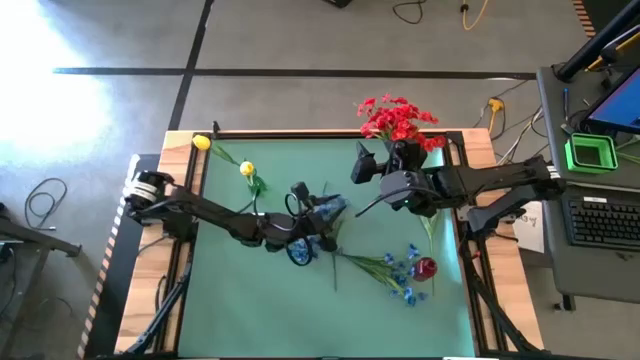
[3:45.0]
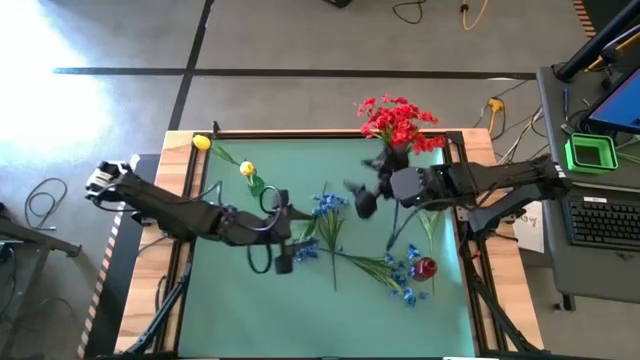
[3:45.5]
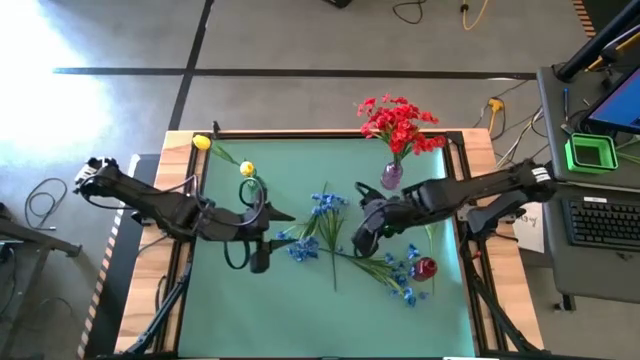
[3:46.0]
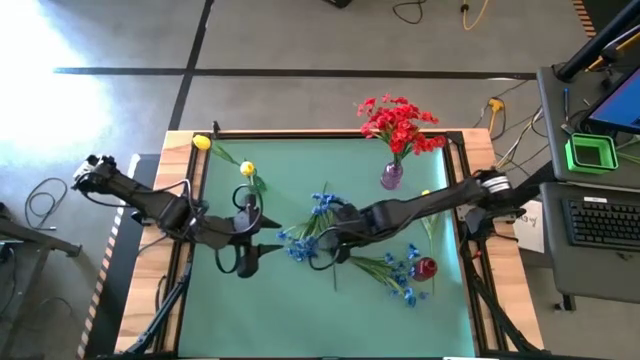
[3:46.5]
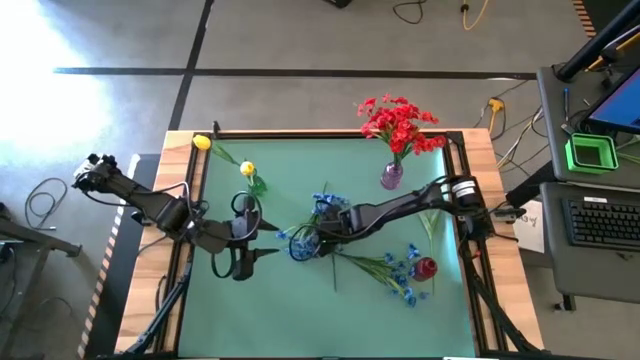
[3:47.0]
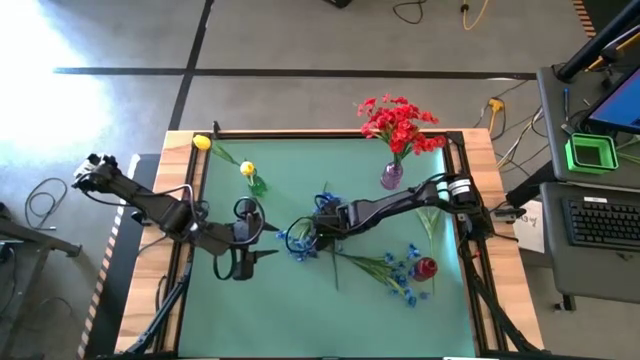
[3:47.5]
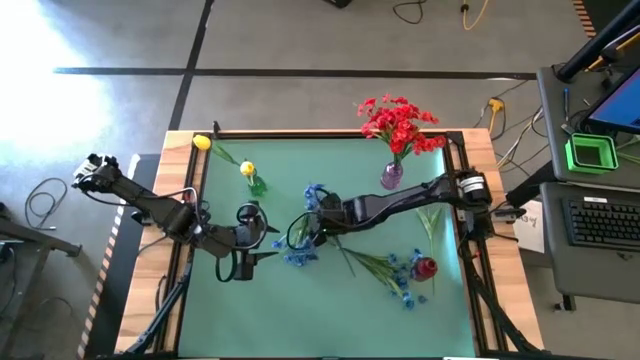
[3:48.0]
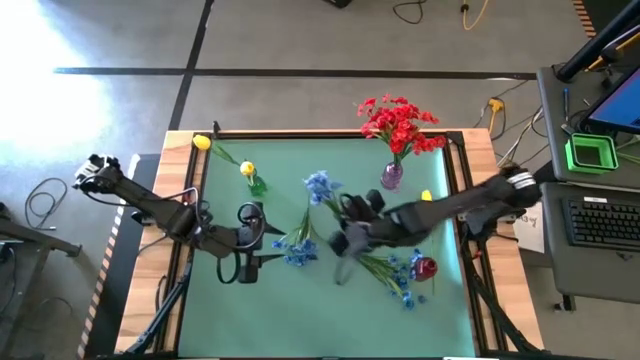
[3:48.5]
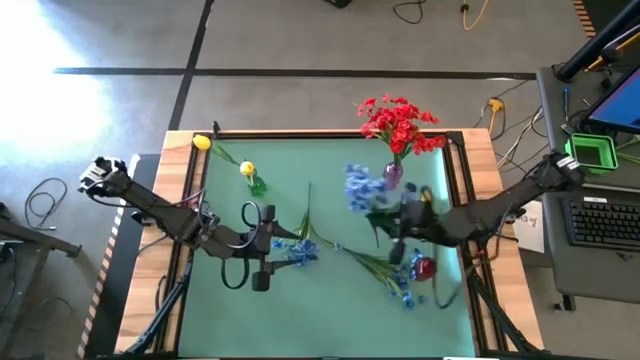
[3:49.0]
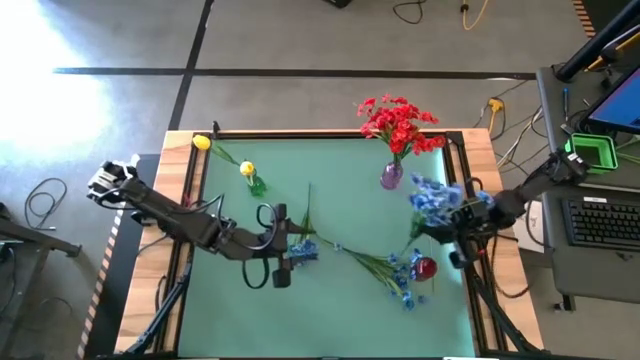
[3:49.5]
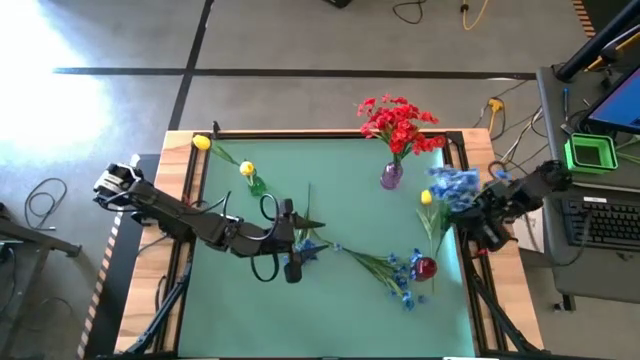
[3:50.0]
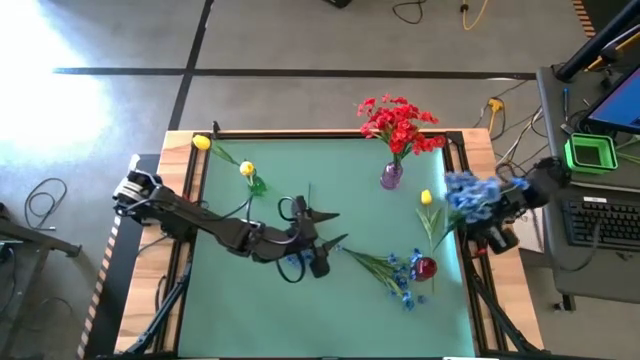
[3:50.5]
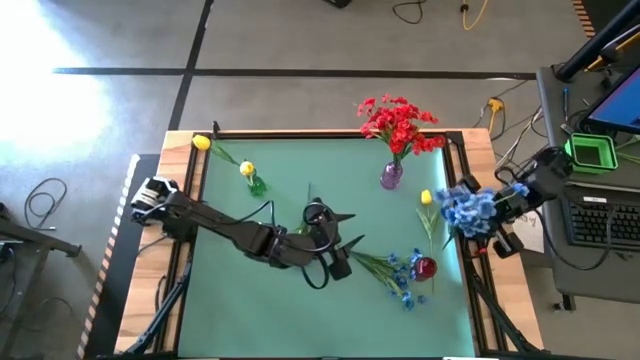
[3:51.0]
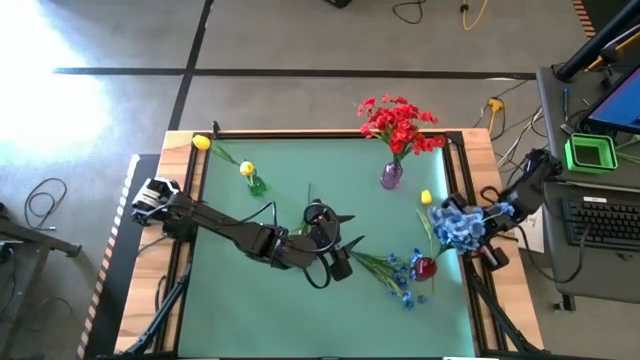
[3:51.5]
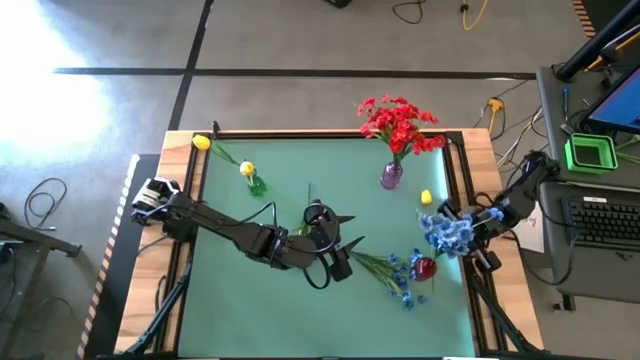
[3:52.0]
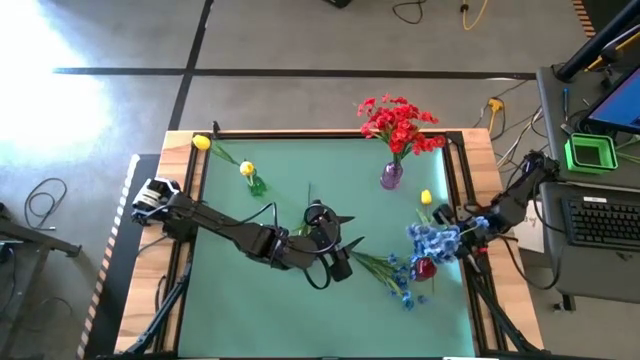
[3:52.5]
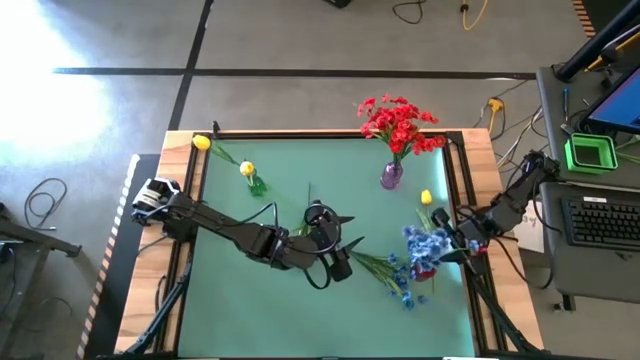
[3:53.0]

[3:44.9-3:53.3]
Task: Sort flowers into vase by color
Put the middle blue flower into the red vase

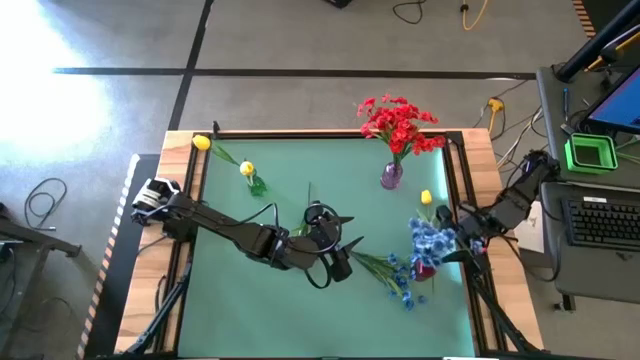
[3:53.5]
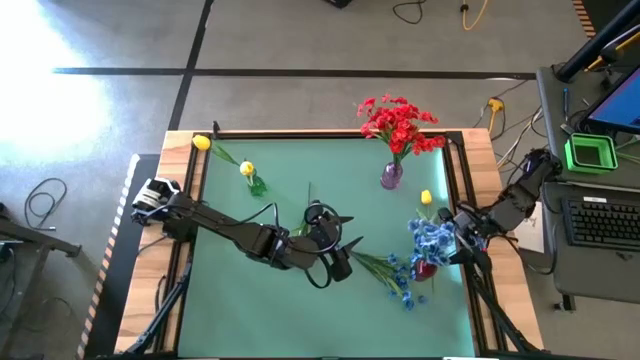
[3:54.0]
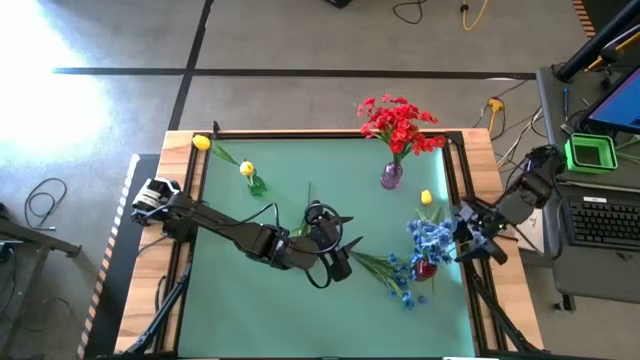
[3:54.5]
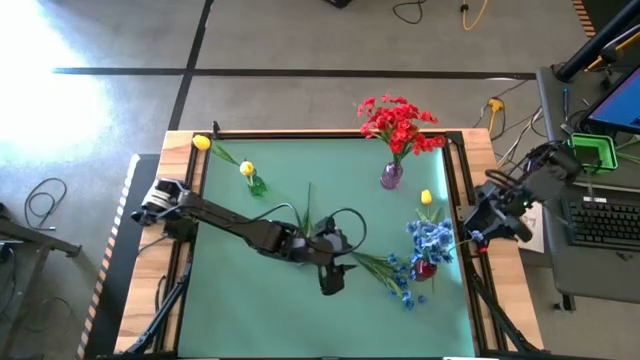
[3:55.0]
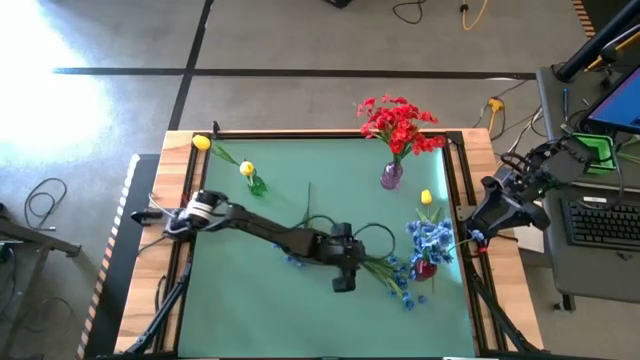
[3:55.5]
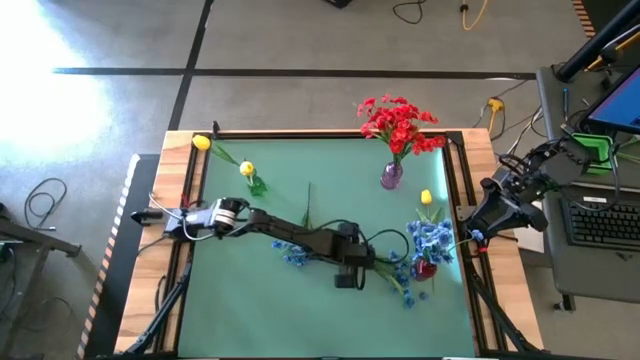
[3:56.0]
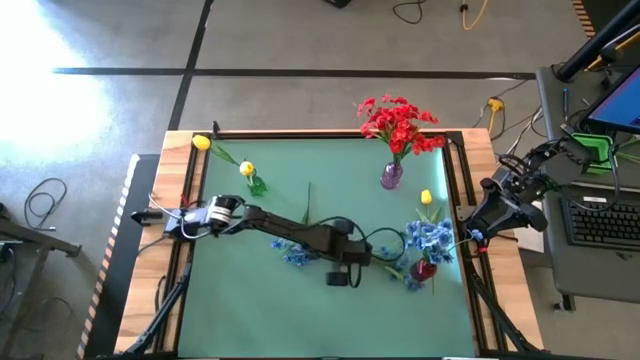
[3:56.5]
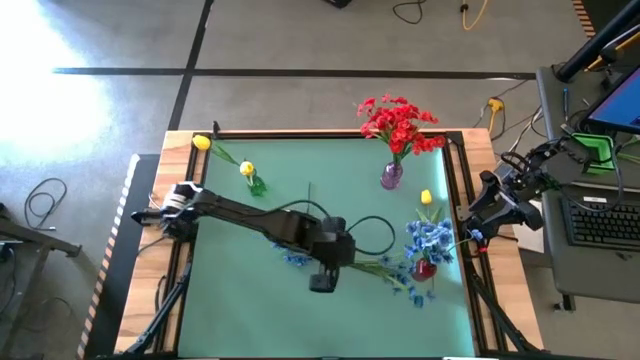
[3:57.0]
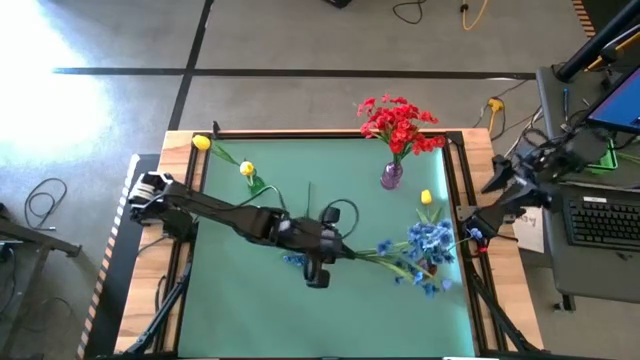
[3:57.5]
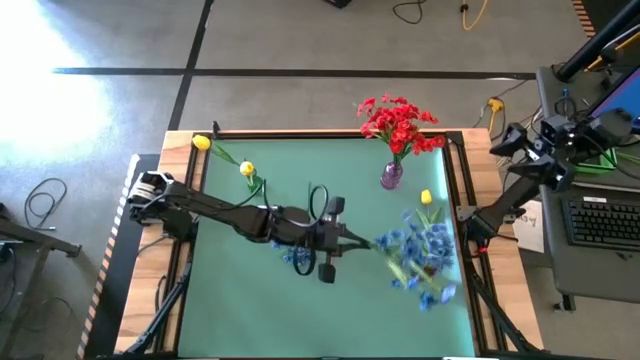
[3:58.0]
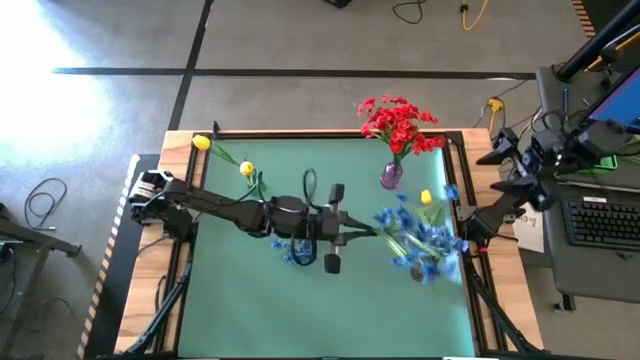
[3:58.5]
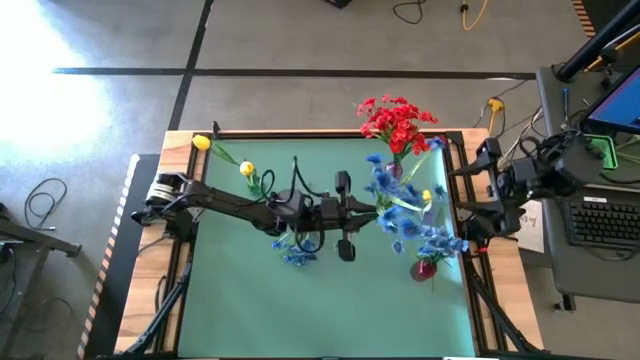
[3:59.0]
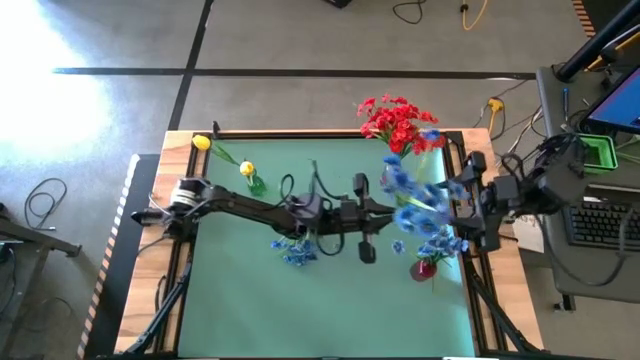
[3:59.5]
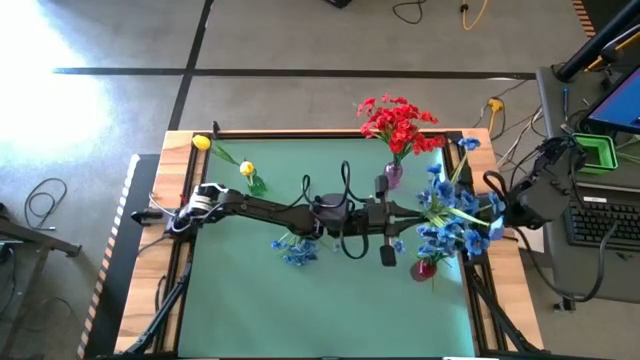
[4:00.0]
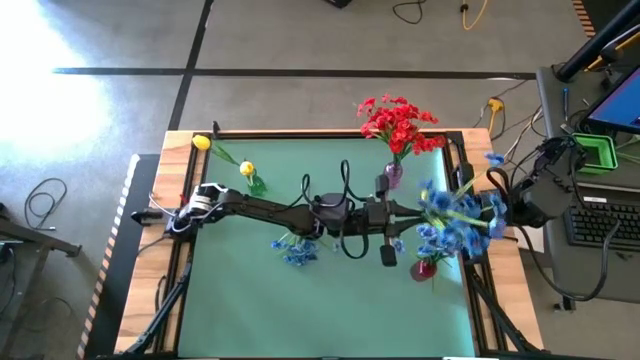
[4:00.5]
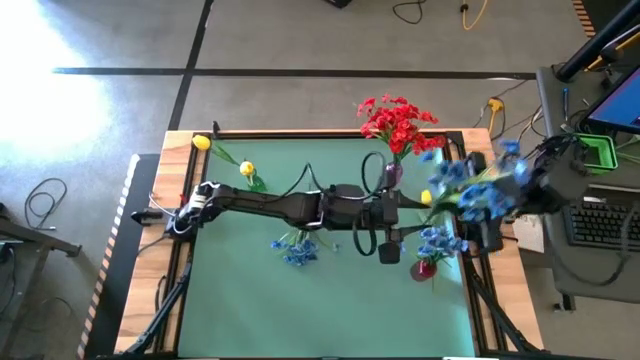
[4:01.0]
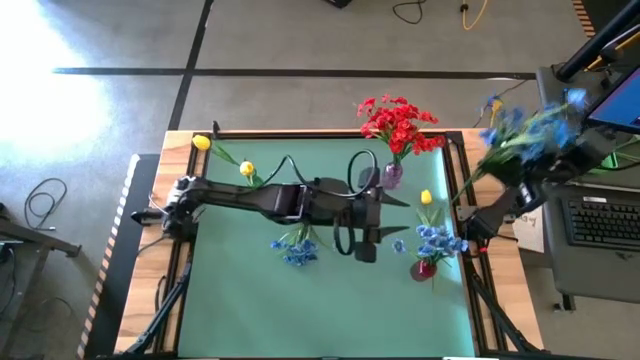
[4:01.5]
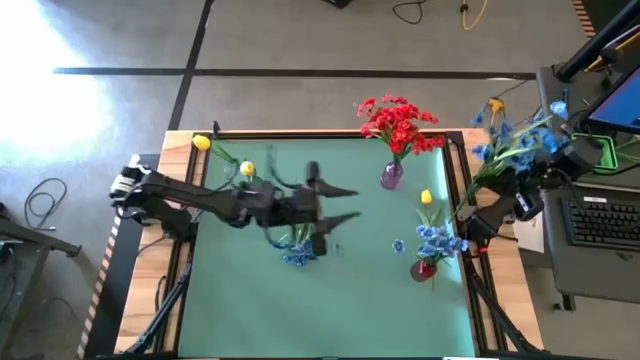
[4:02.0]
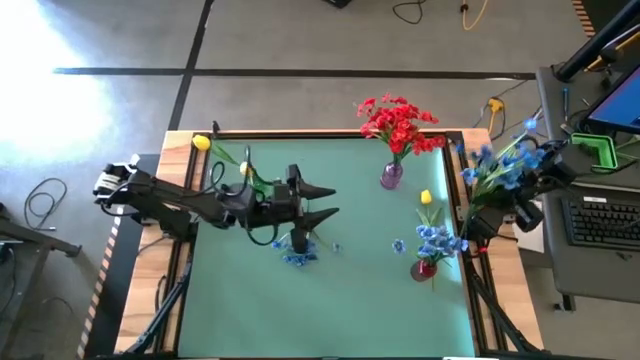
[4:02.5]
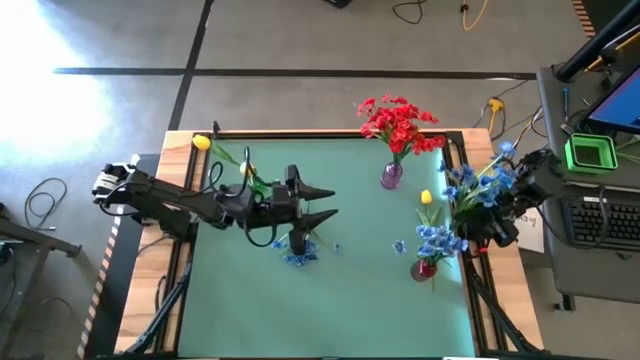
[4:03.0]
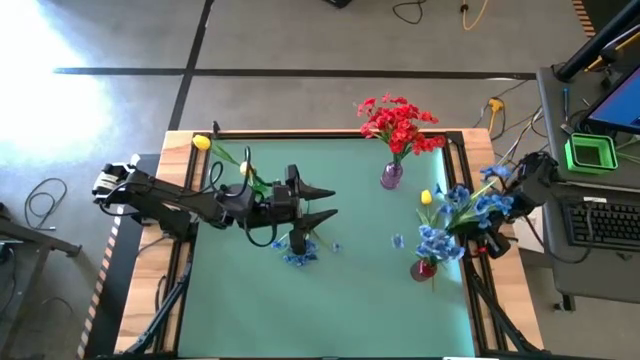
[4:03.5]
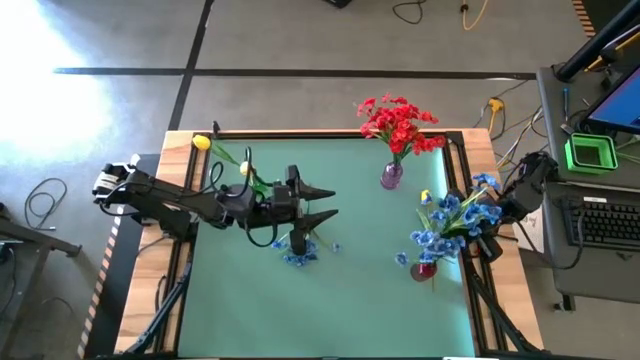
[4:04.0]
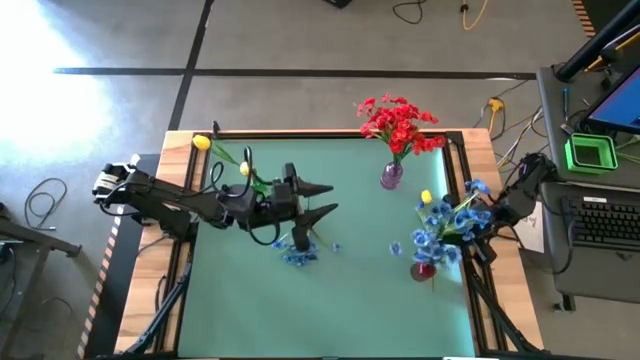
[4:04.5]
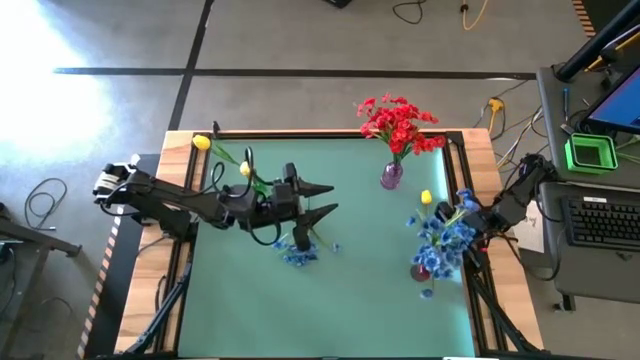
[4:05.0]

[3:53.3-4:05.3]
Put the right blue flower into the red vase

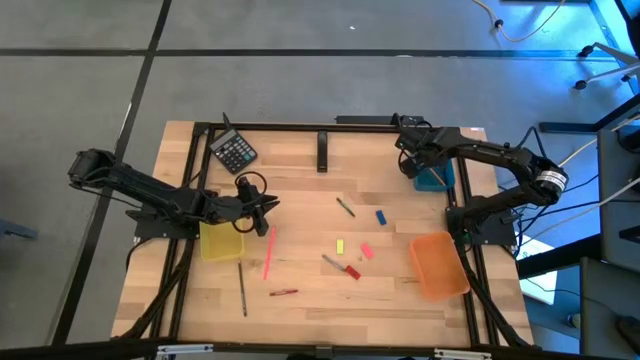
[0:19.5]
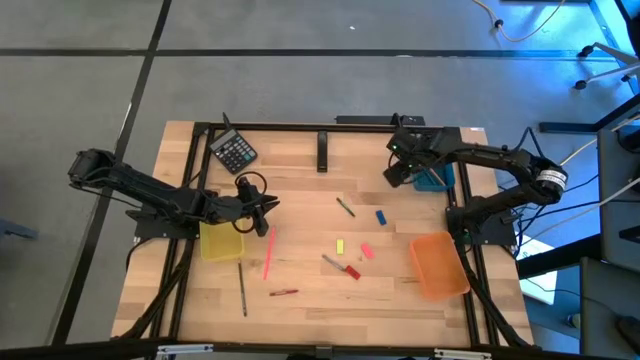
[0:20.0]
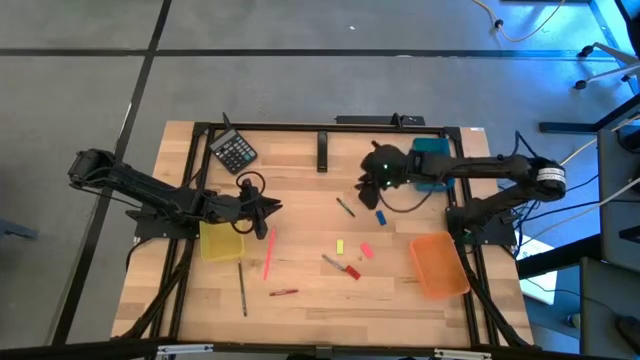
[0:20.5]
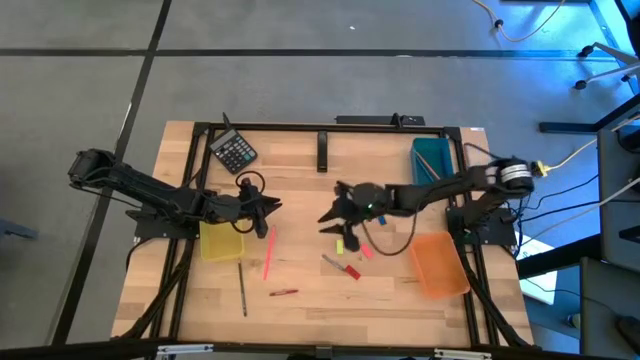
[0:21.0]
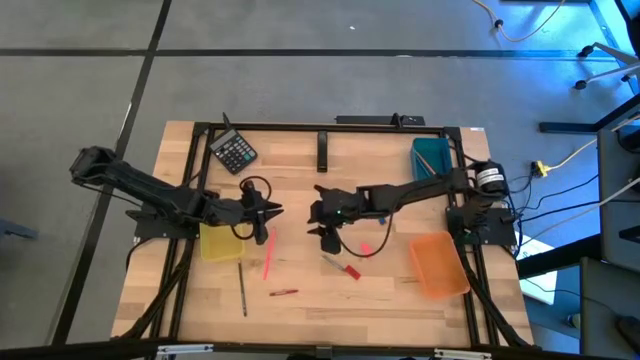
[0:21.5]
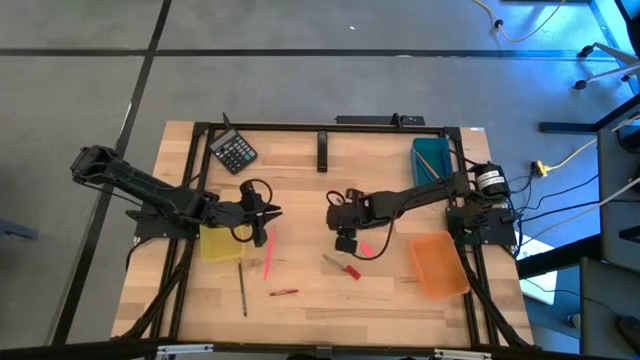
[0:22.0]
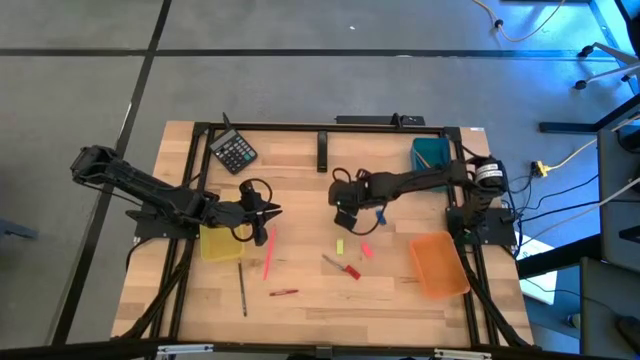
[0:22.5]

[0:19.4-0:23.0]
Task: Sort crayons/erasers/pens/pencils in bins
Put the green crayon into the orange bin
